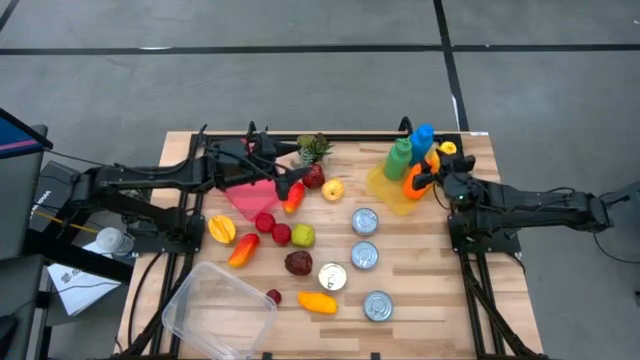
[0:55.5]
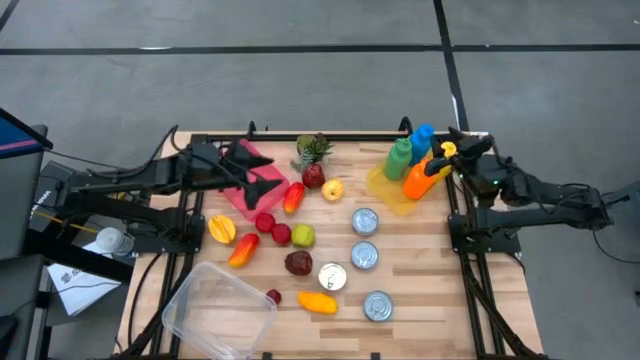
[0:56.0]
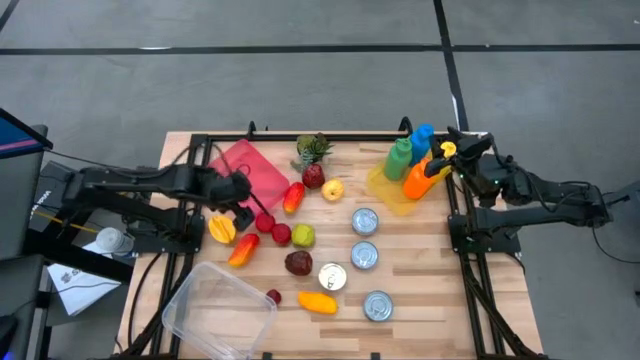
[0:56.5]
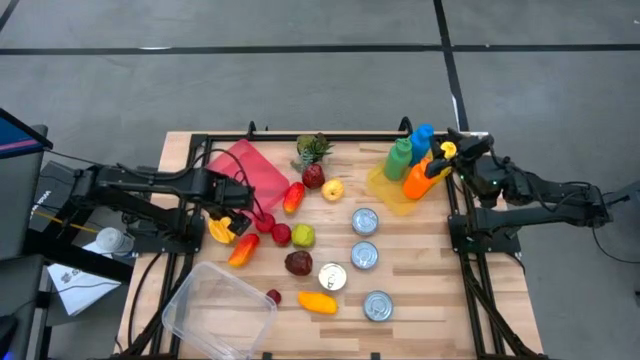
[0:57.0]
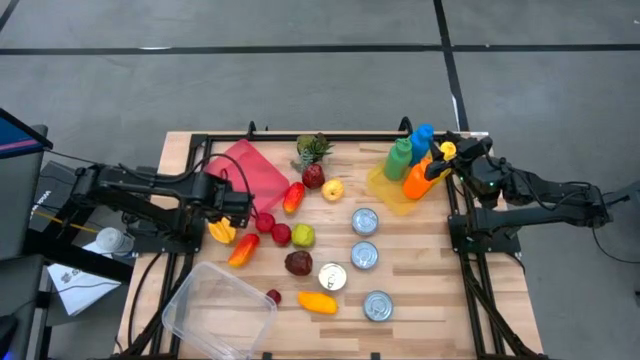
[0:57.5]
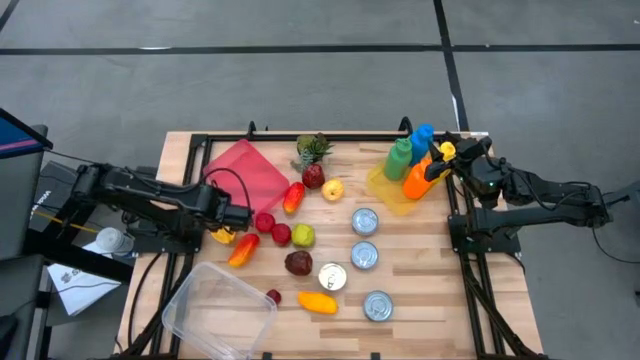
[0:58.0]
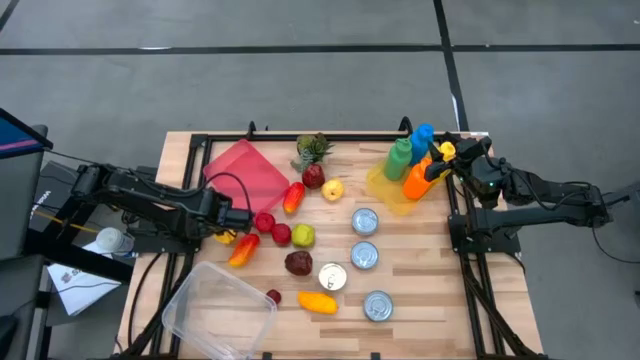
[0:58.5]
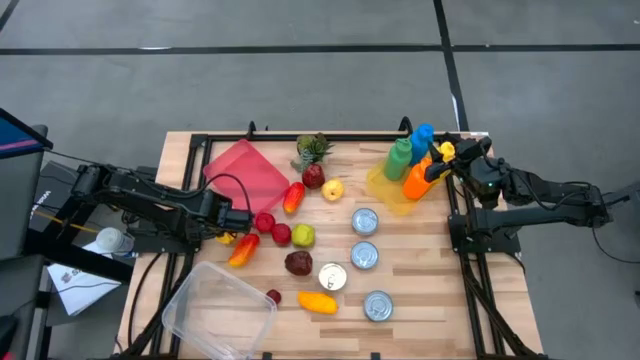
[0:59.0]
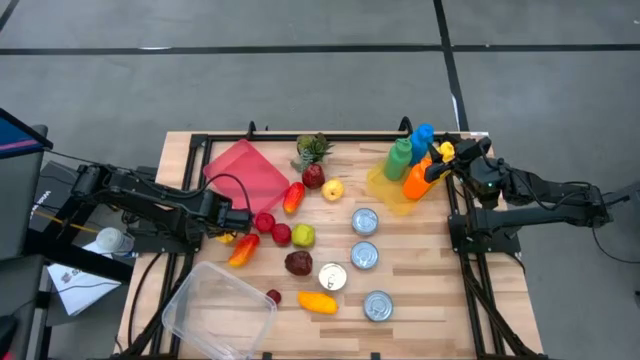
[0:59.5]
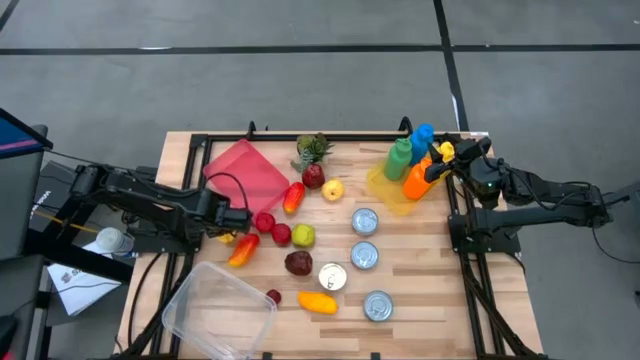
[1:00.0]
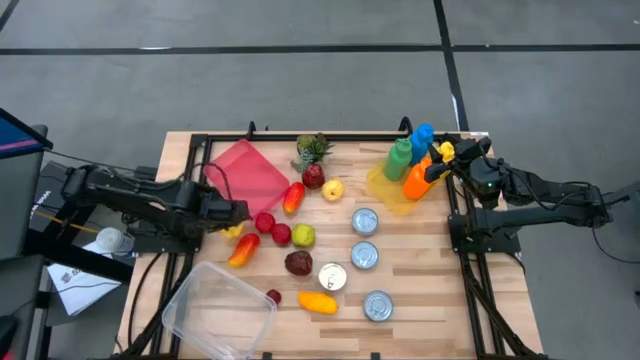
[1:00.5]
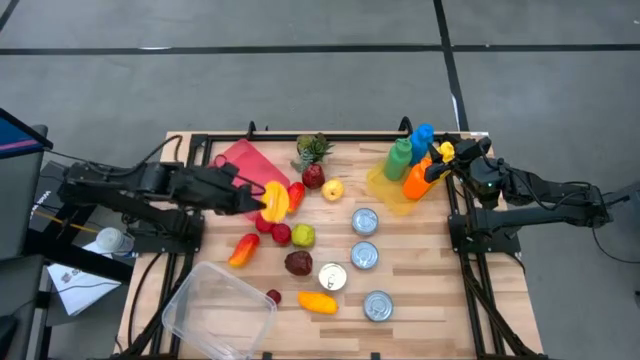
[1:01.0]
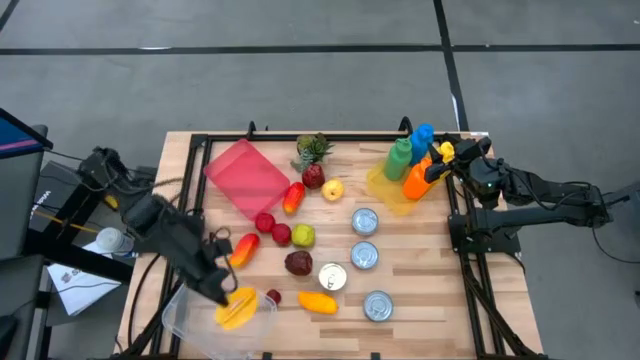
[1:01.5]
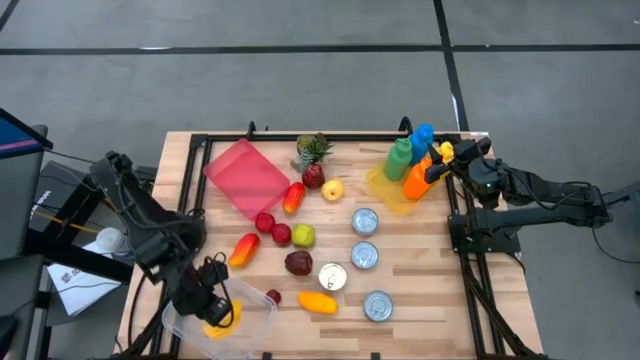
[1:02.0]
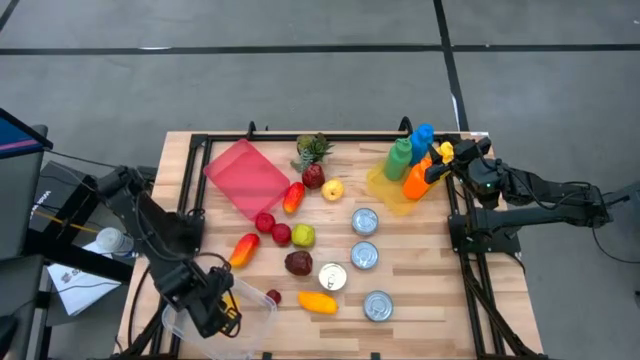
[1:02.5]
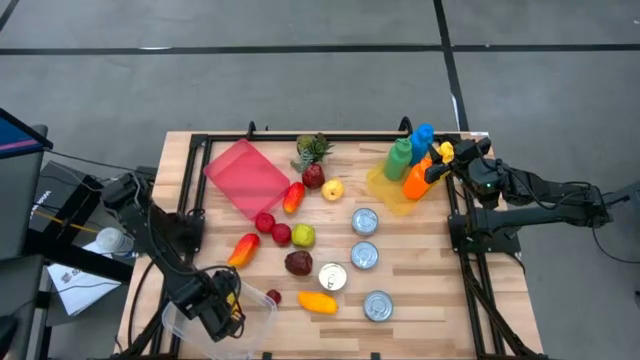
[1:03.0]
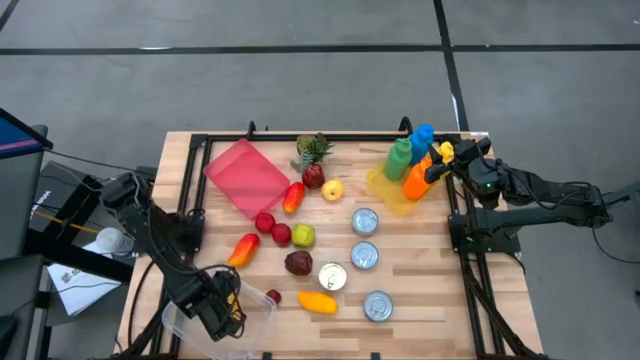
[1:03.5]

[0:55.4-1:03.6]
Task: Pick & Place Food Item
Put the yellow star fruit into the transparent bin

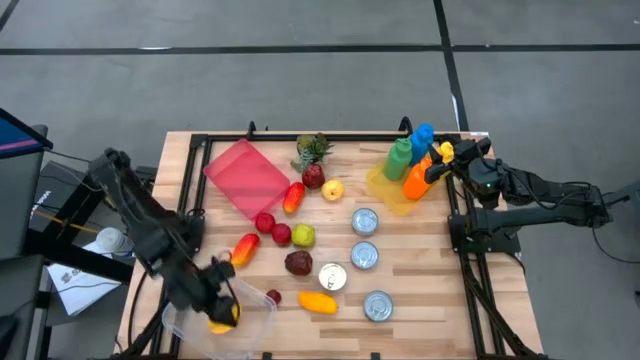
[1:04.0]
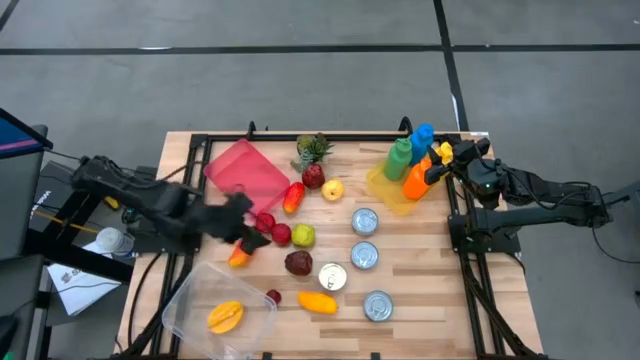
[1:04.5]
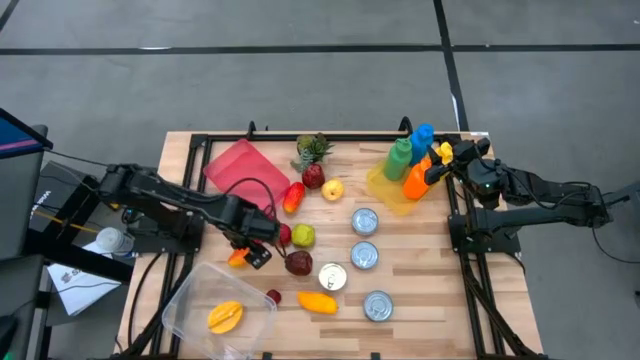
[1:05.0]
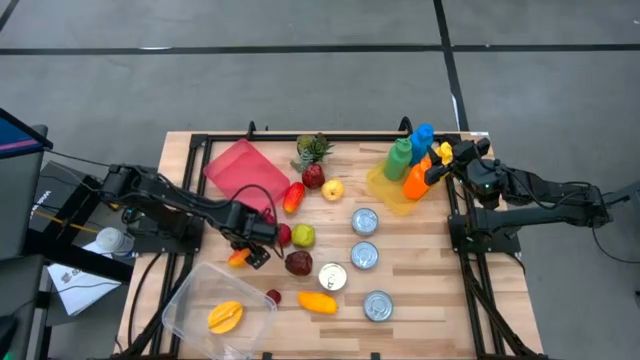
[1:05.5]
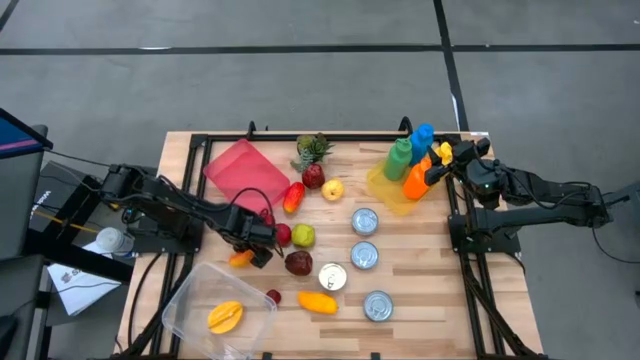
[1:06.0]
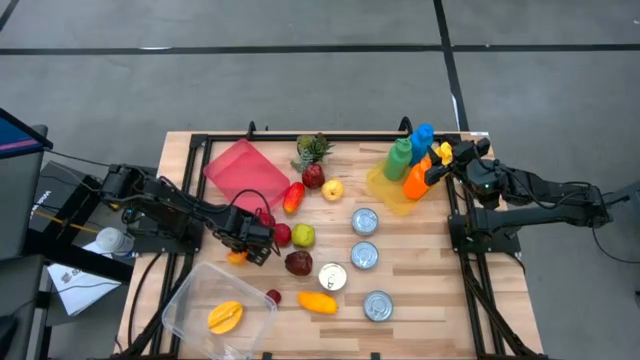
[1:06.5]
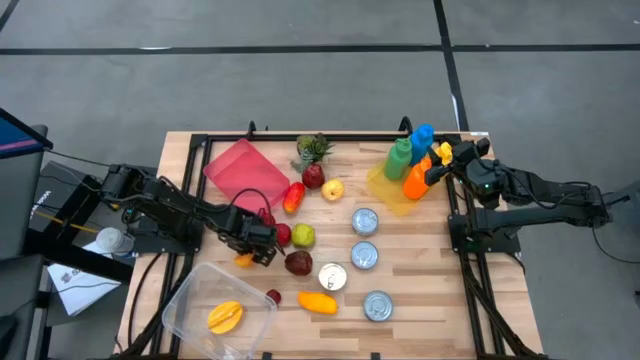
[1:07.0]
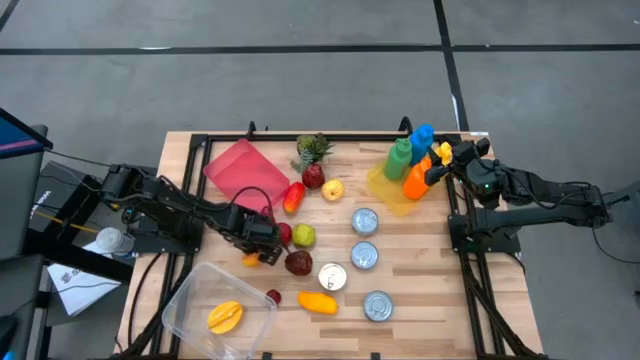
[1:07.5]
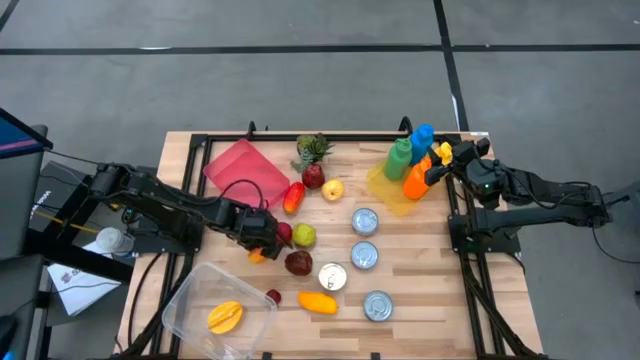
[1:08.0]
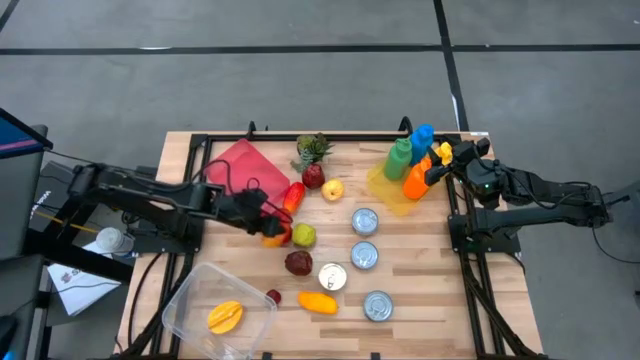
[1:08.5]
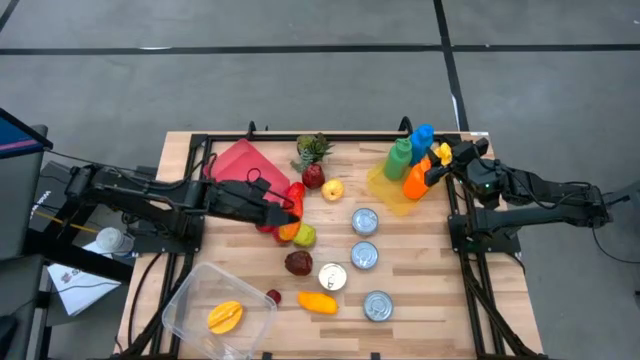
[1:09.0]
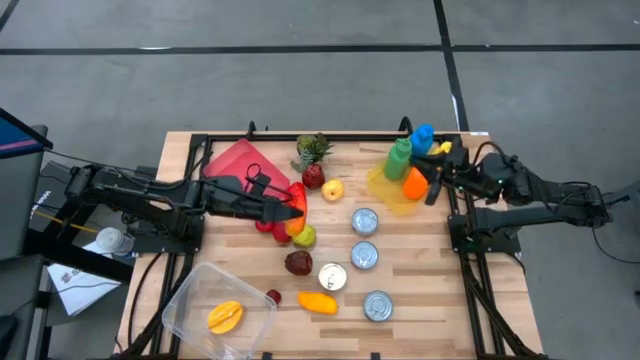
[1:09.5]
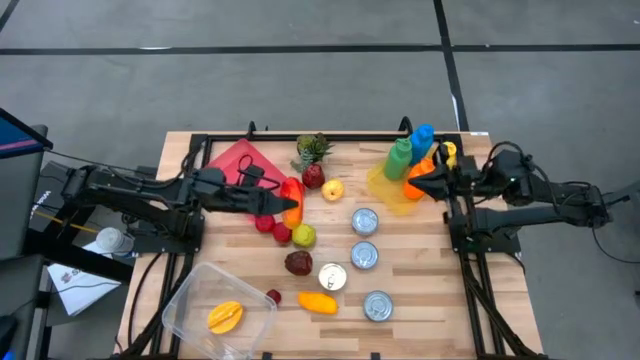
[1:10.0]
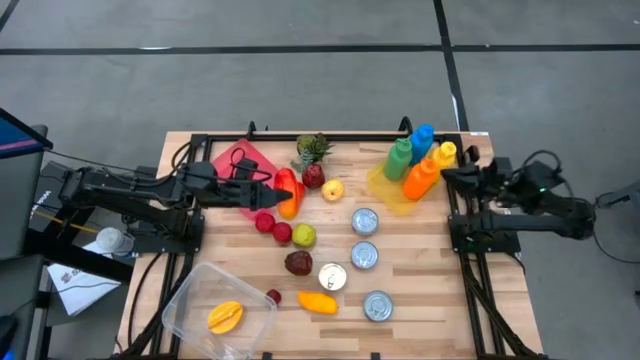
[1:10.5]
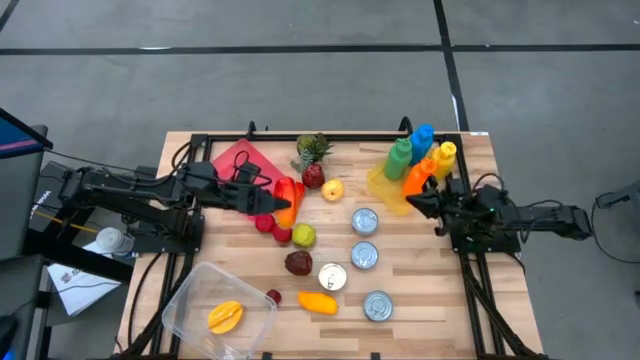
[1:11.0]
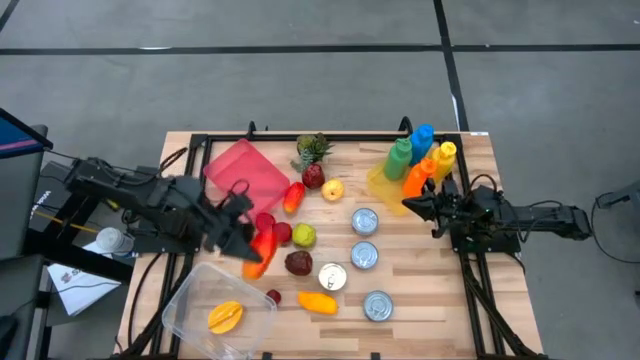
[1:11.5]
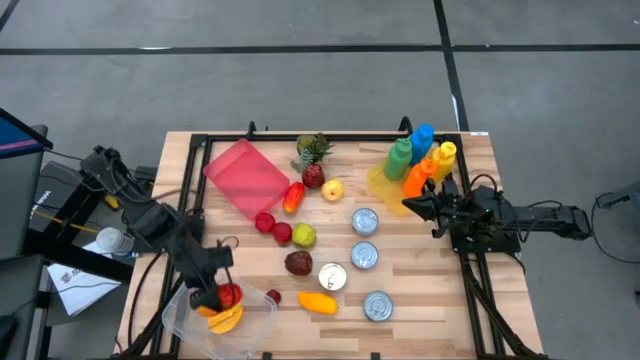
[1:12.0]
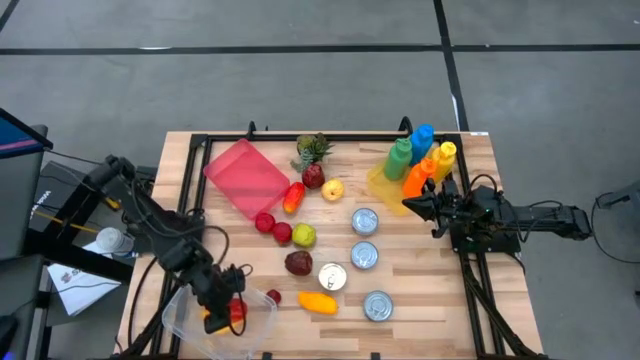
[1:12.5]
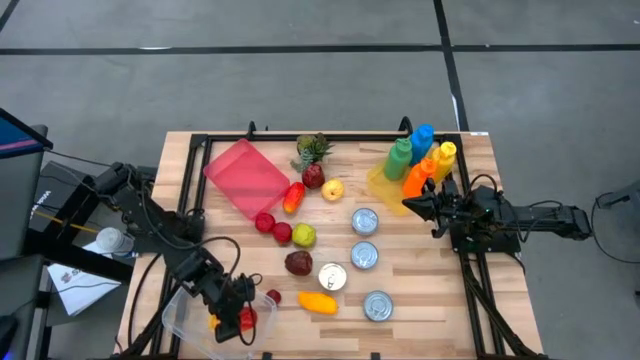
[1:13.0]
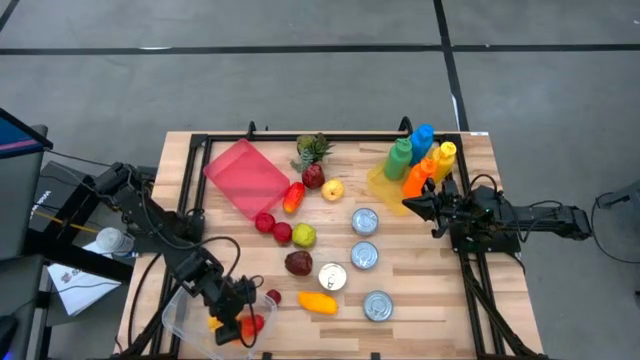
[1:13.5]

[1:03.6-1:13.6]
Put the bottom red mango into the transparent bin

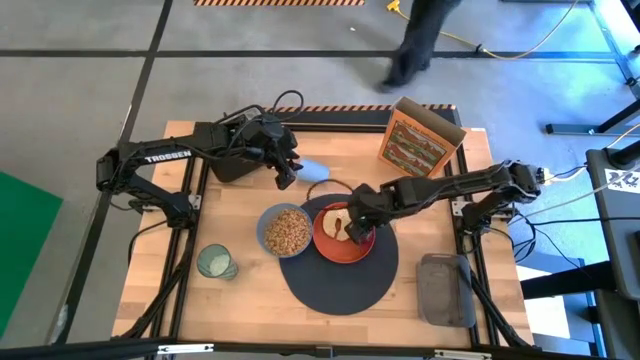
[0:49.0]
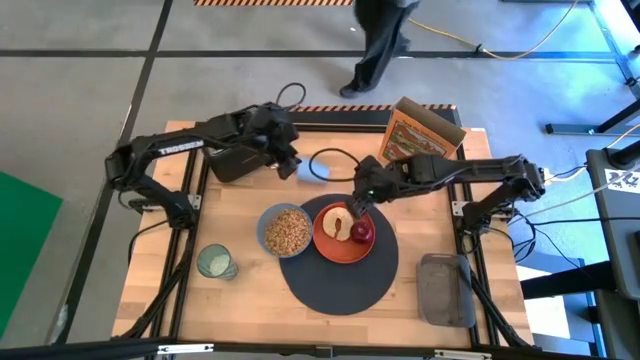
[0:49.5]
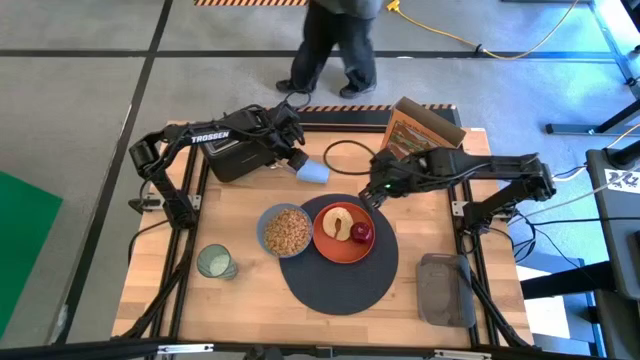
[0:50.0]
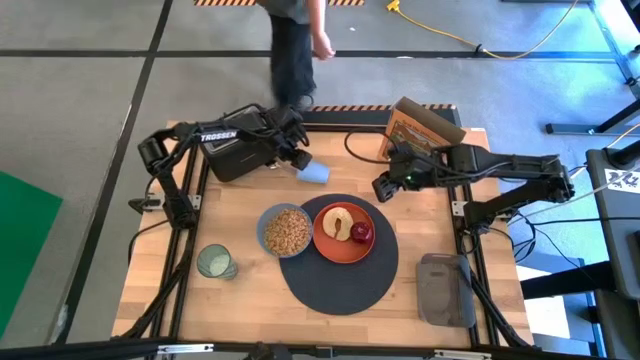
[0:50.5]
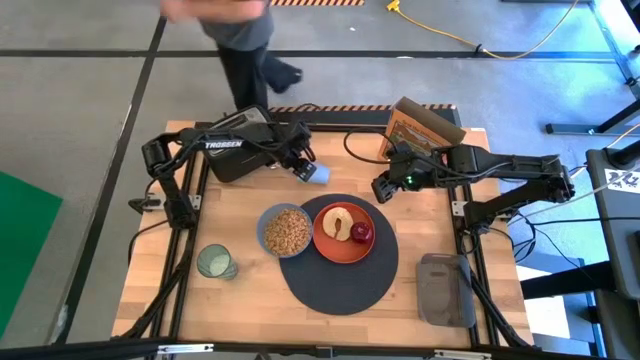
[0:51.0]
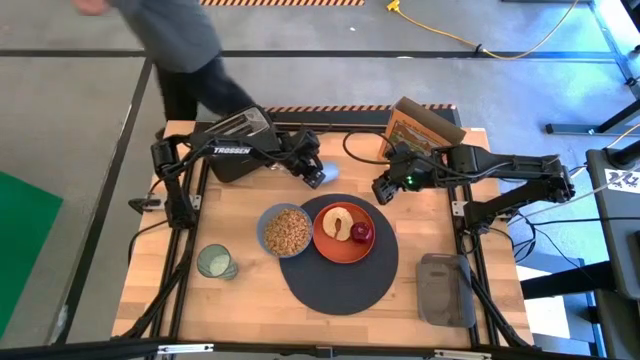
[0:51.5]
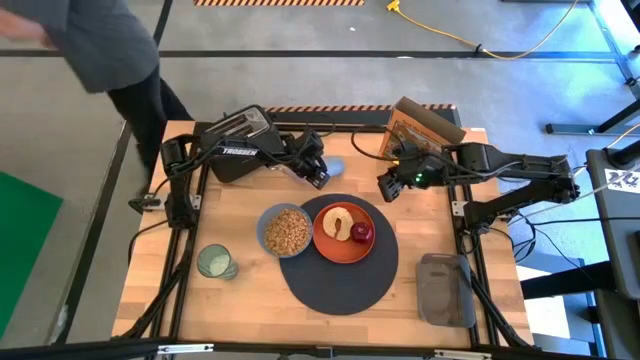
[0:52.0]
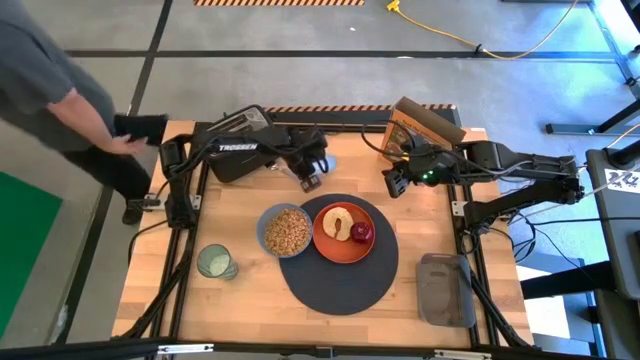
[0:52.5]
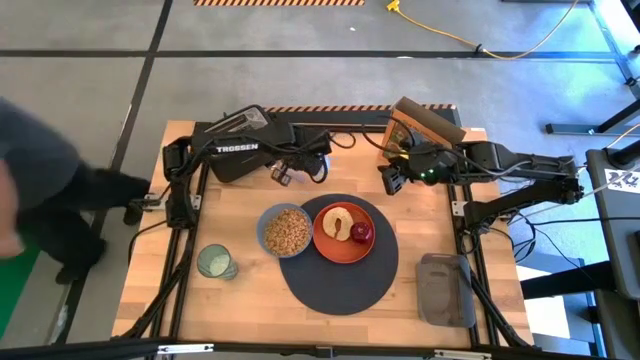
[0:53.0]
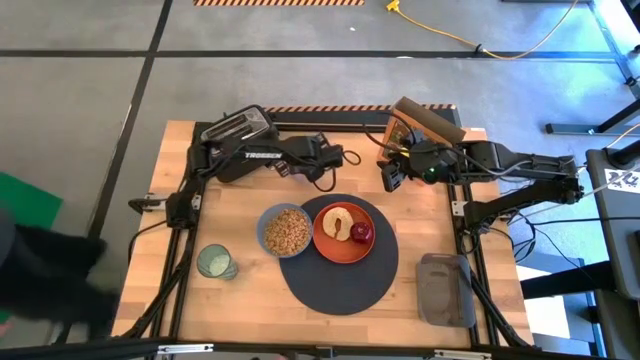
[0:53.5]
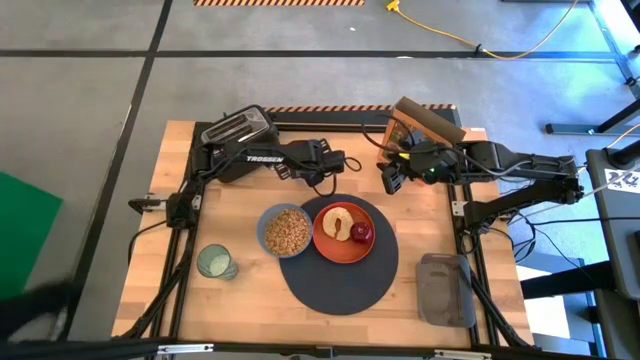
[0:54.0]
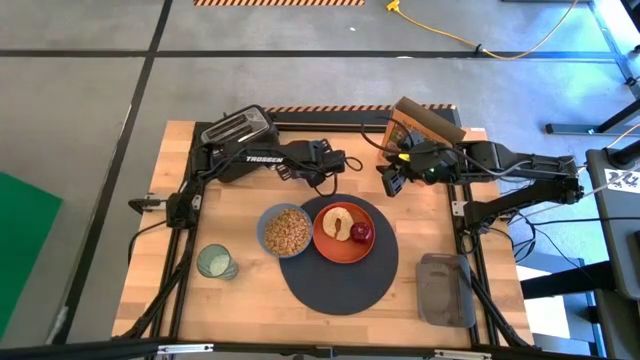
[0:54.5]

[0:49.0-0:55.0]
Task: Arrange a breakfast setting
Adjust the cup
